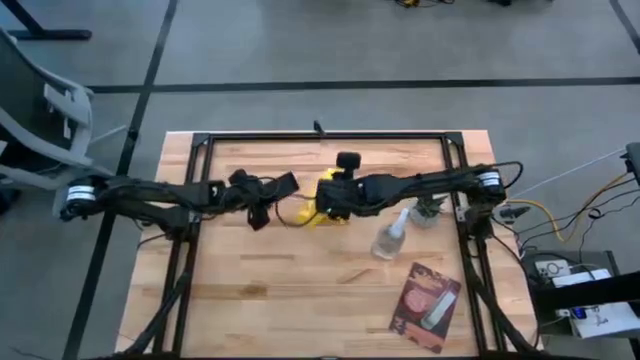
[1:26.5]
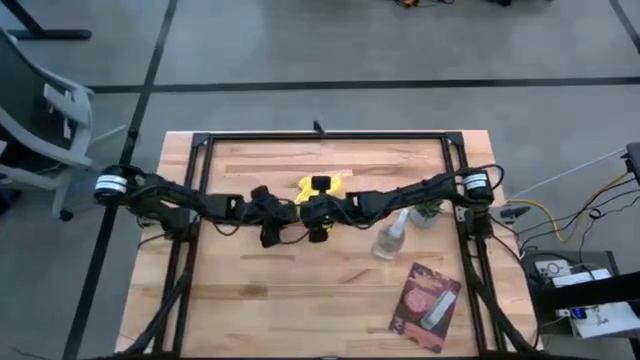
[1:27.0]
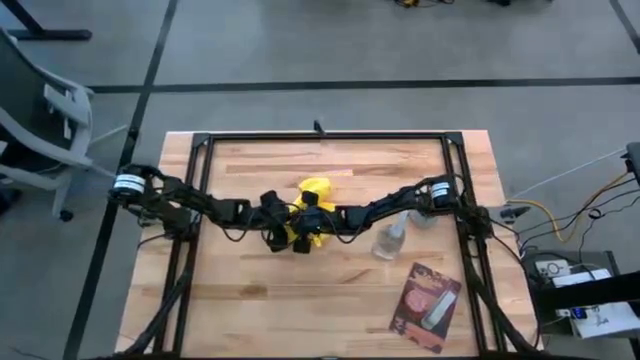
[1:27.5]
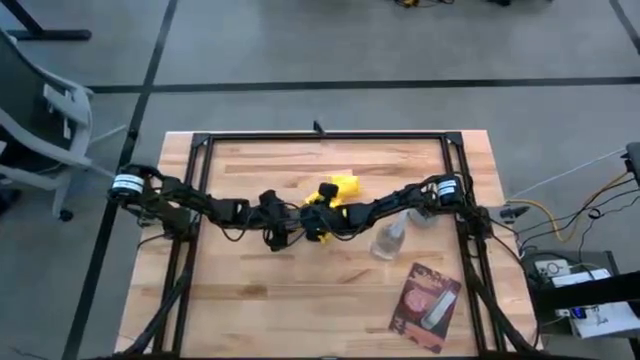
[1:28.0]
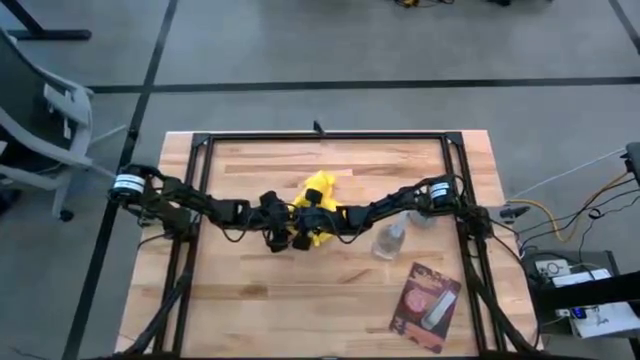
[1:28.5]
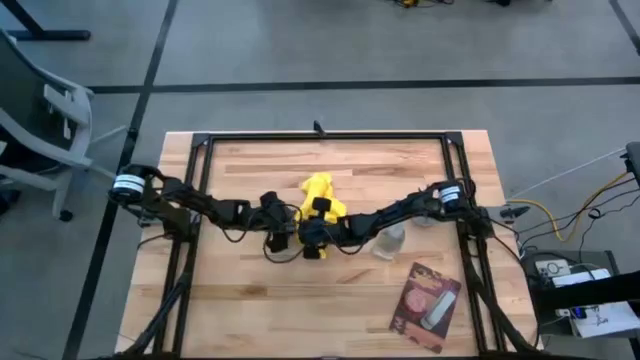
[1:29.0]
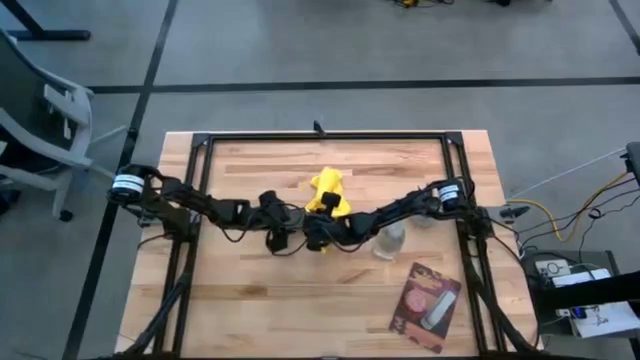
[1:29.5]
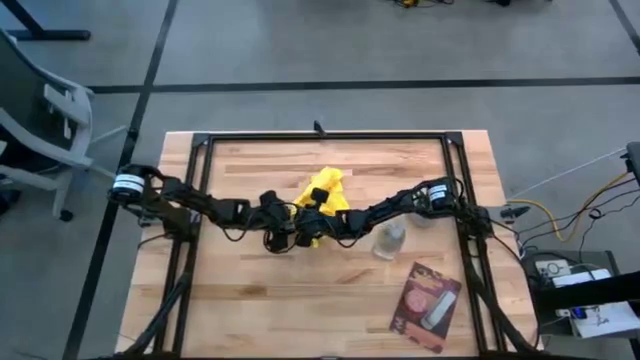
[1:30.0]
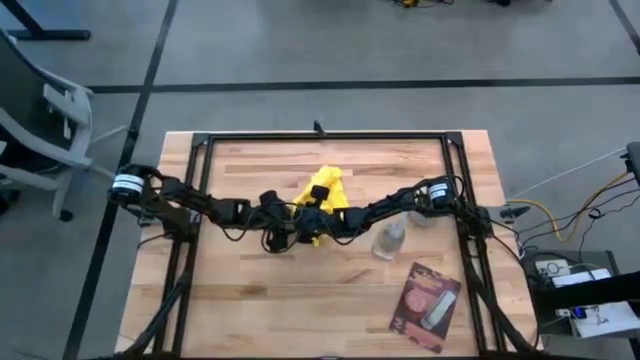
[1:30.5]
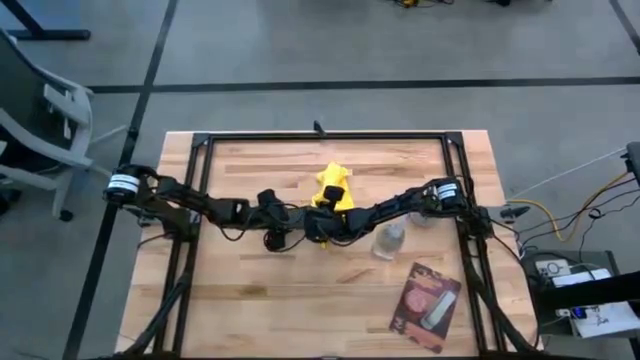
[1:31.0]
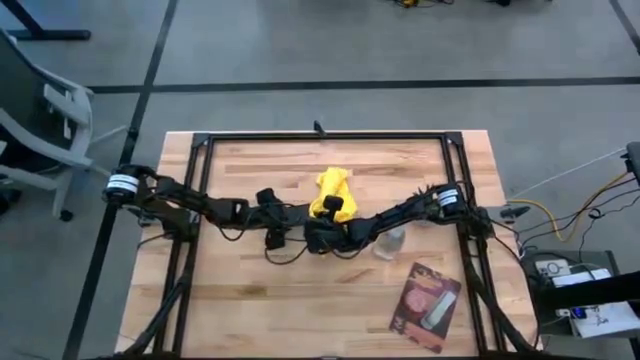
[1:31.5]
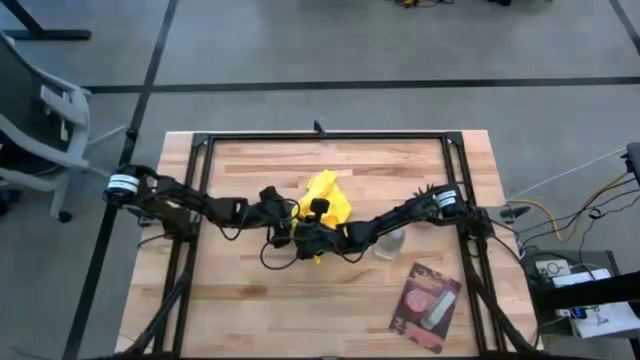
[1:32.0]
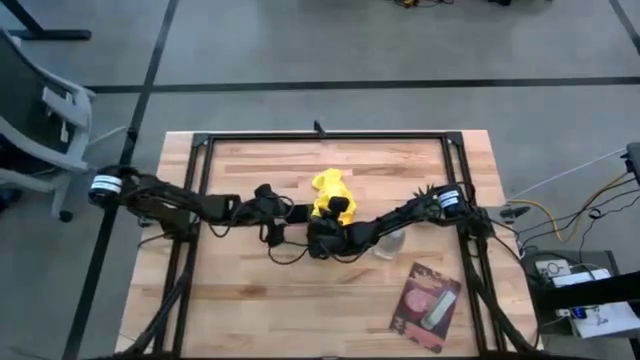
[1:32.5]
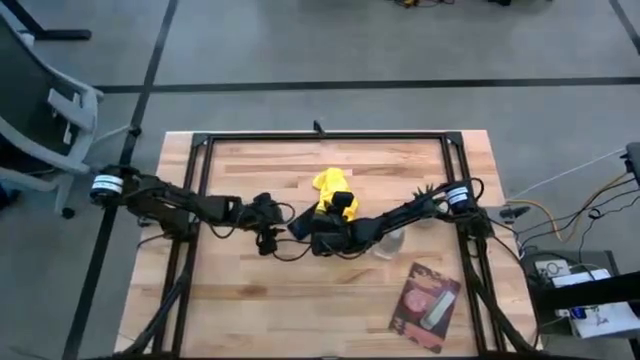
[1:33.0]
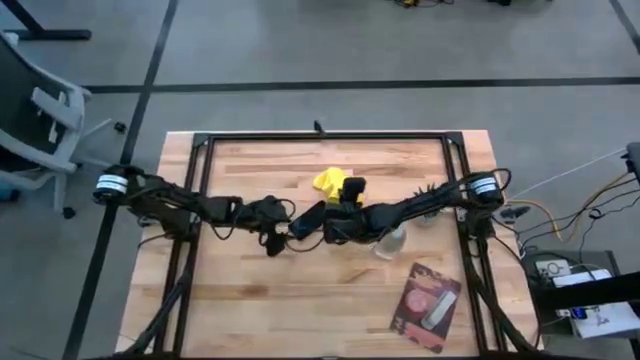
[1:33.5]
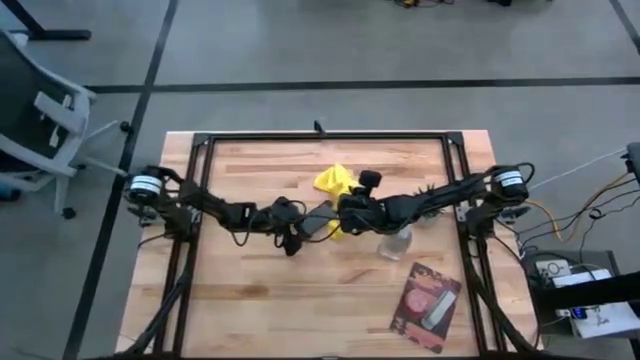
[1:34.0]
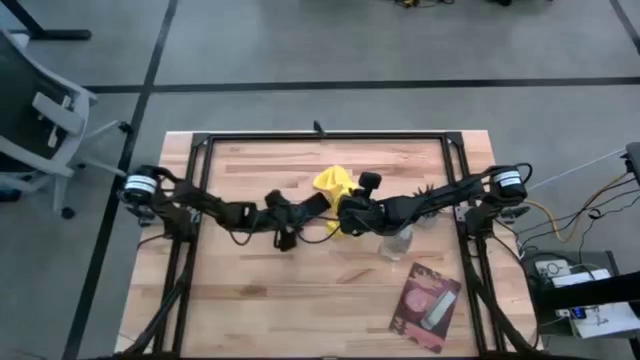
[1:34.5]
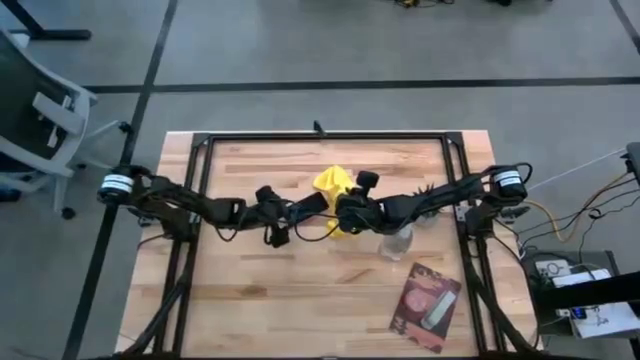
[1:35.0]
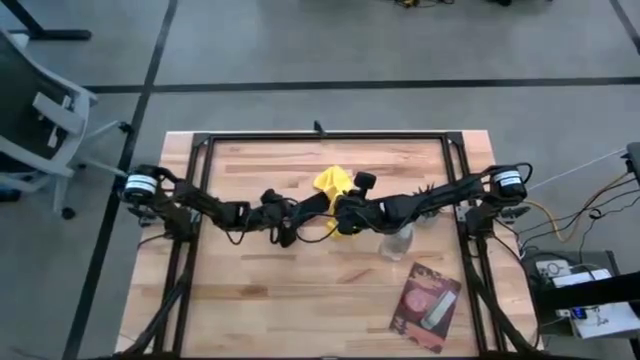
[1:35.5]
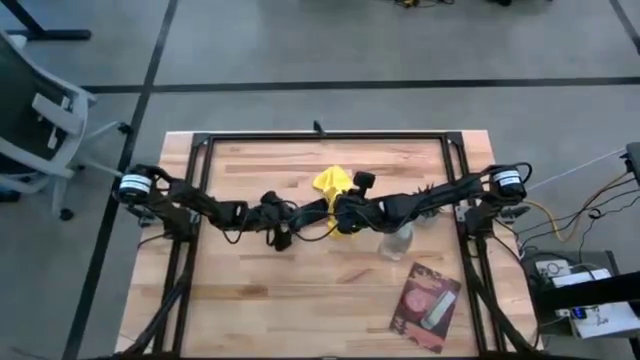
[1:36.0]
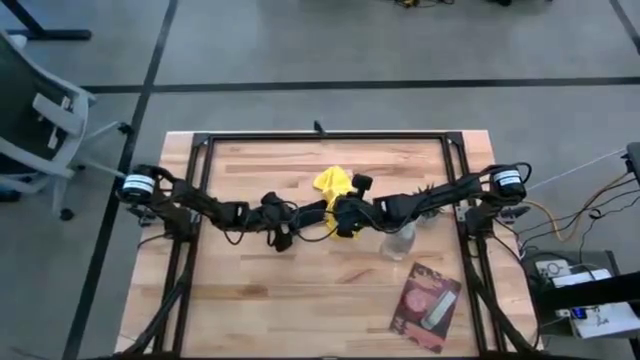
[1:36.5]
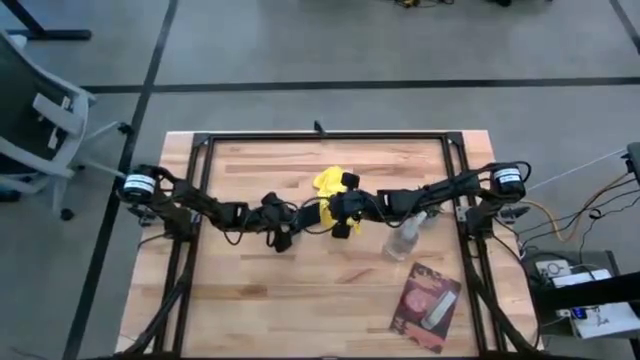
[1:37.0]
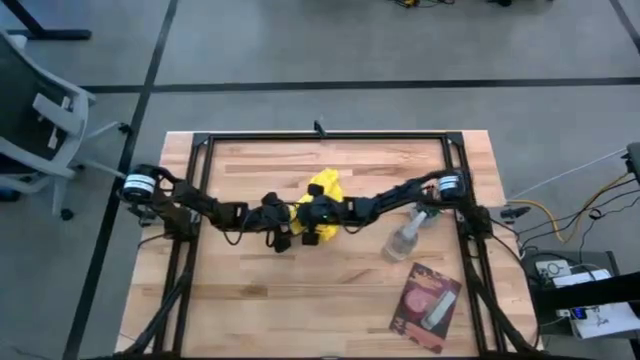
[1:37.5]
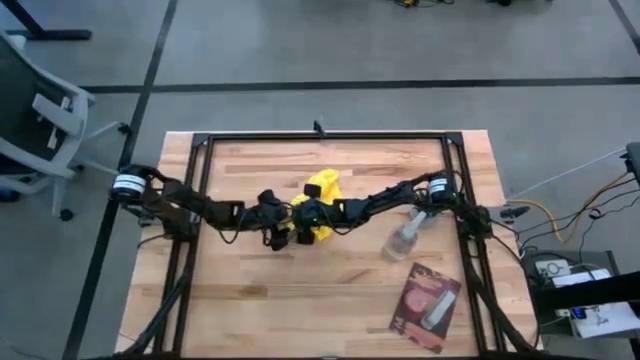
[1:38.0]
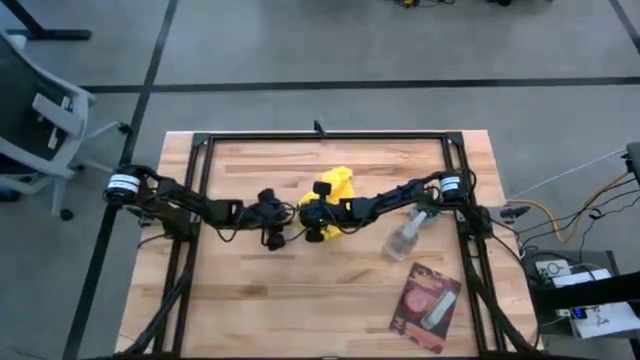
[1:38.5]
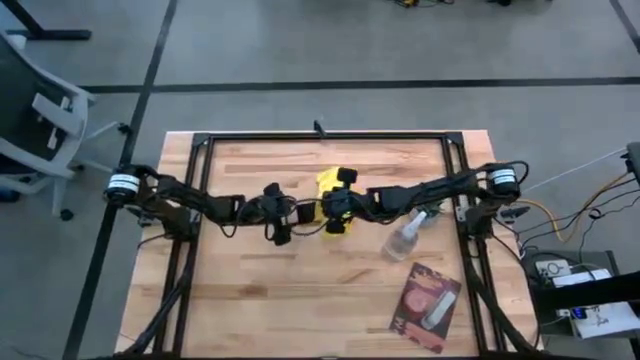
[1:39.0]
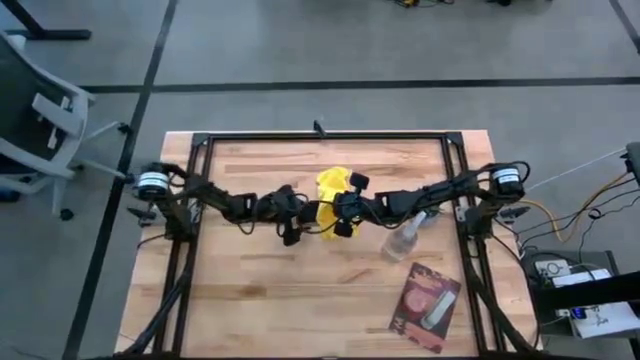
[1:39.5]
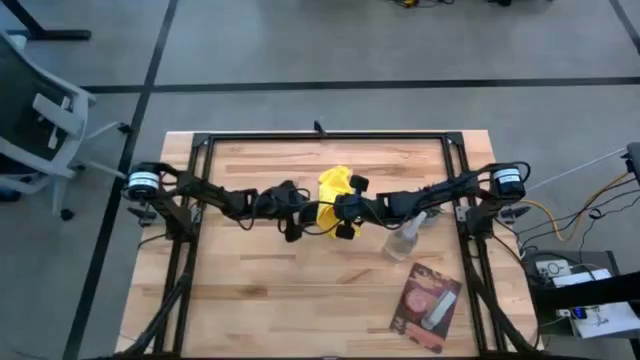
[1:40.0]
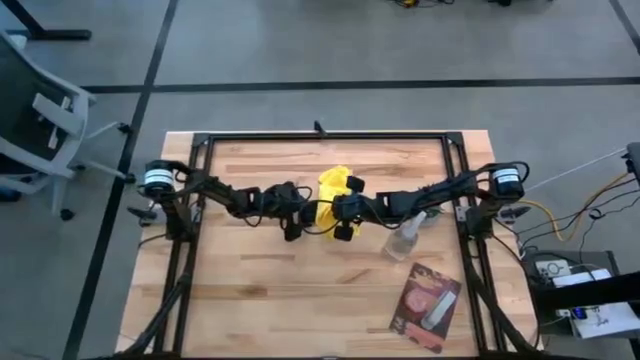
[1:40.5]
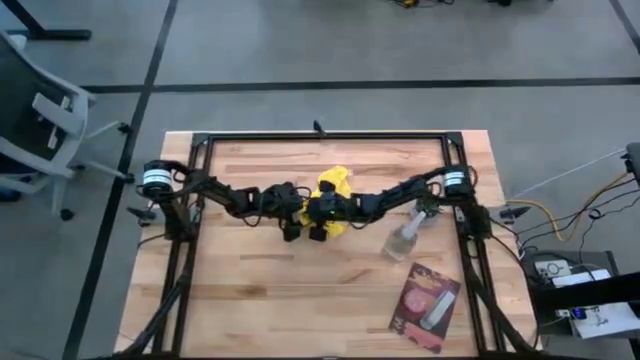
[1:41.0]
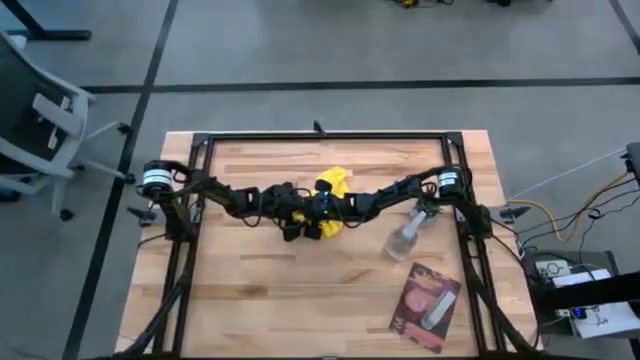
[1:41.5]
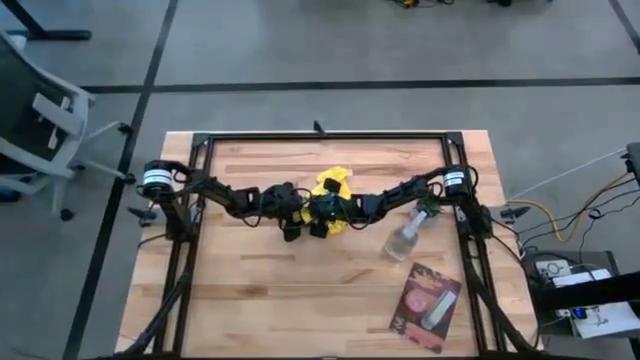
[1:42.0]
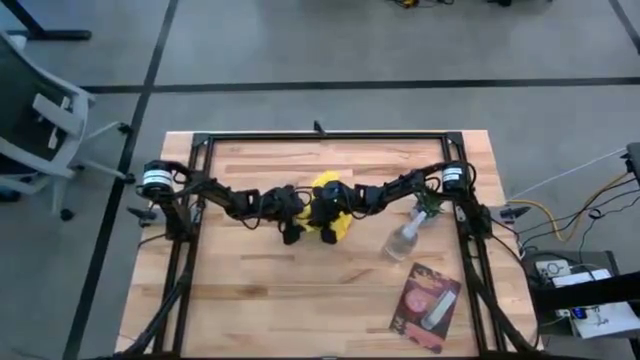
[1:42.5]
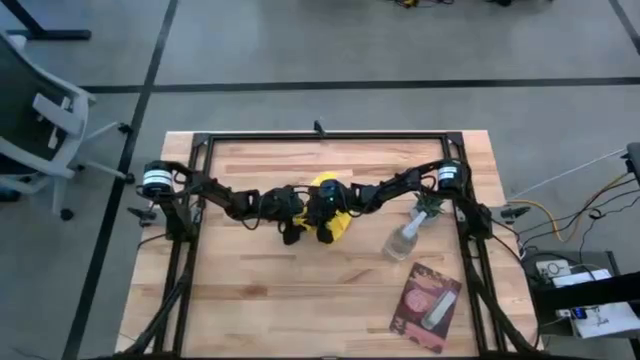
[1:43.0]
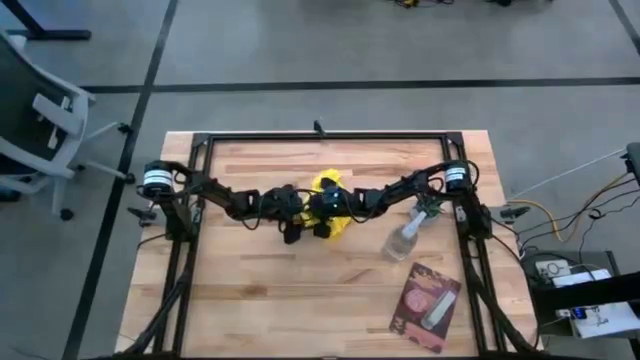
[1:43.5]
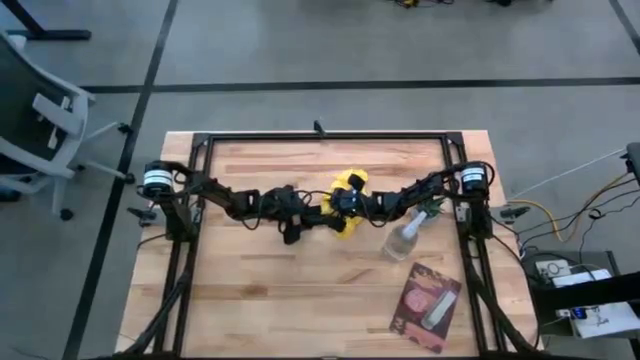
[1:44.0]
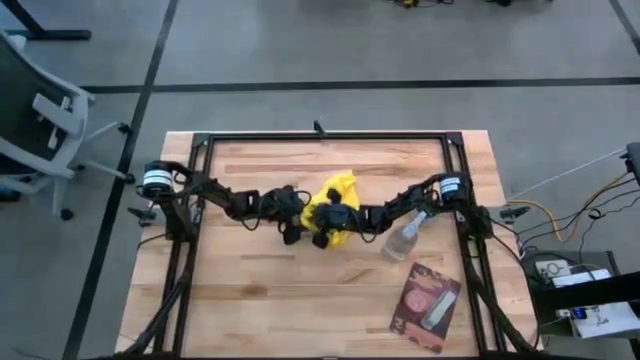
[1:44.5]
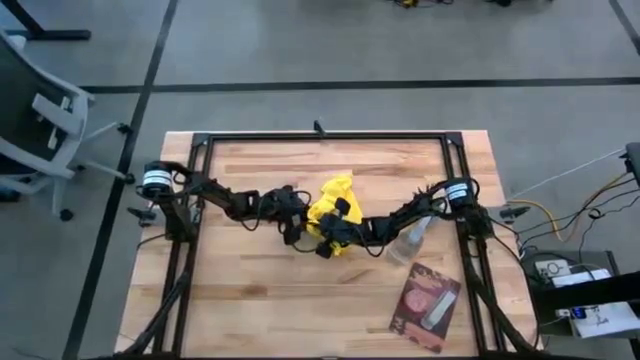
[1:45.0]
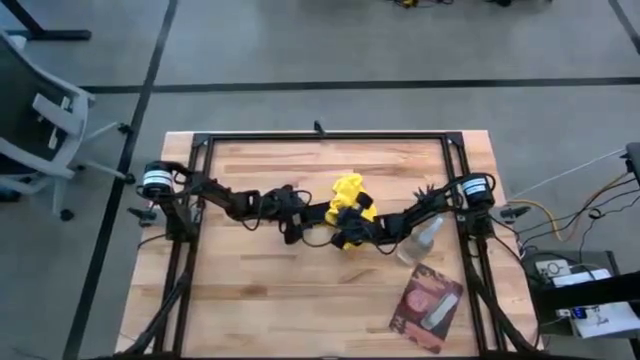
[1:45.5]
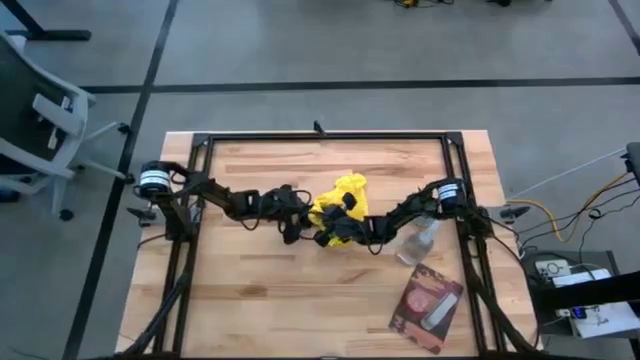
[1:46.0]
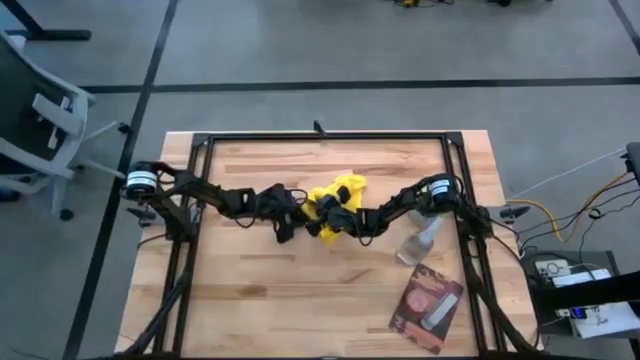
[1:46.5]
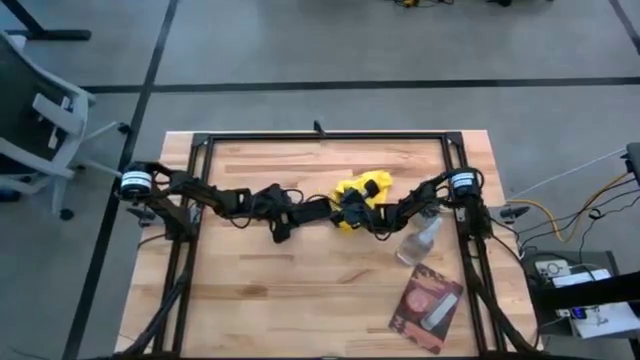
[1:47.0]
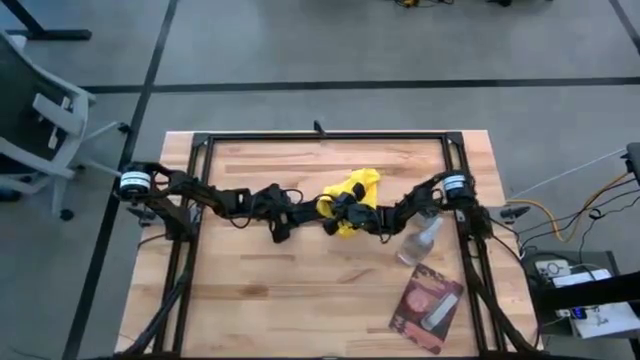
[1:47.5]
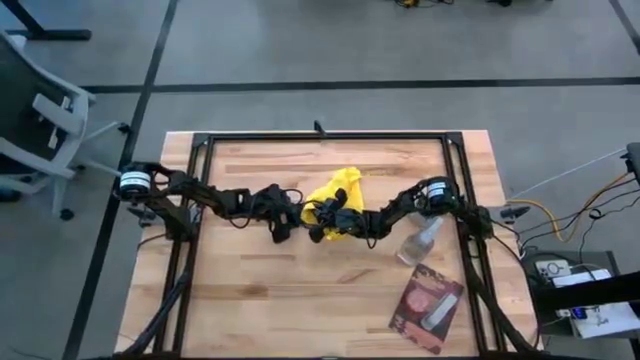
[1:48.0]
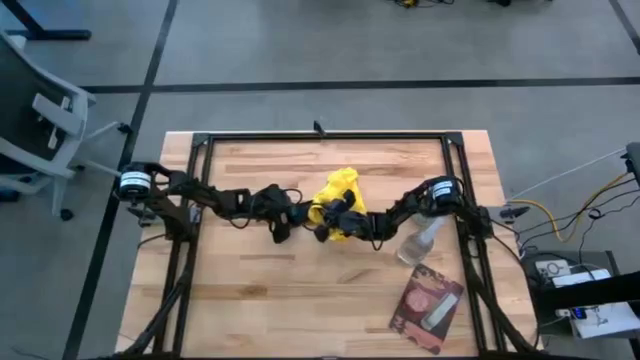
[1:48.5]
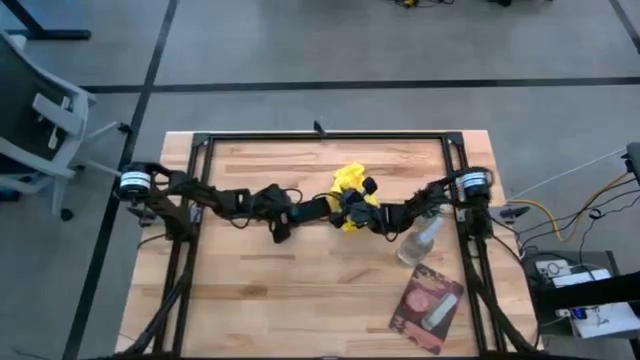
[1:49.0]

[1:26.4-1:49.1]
Task: Apply microfiber cloth
Wipe the front of the pink cellphone with a microfiber cloth
